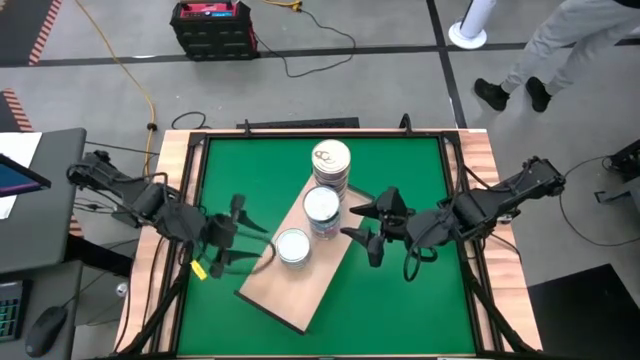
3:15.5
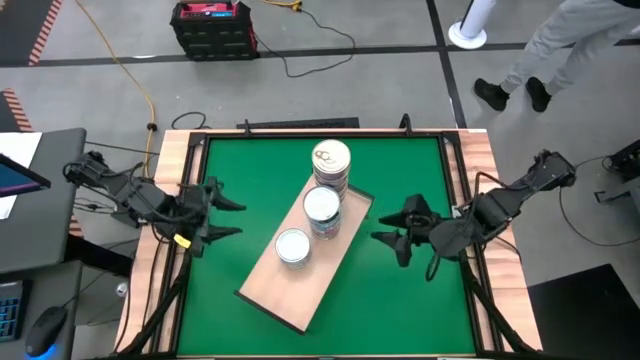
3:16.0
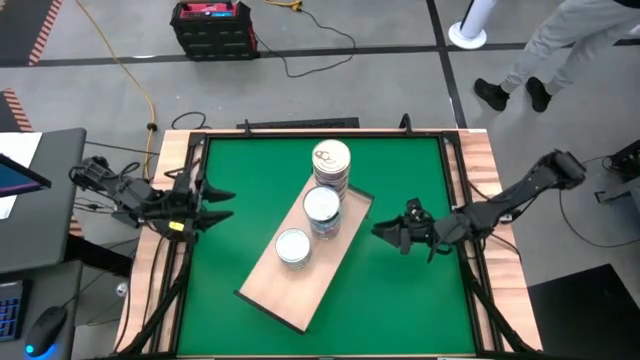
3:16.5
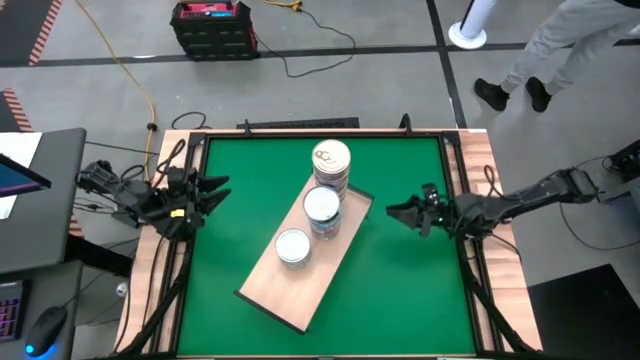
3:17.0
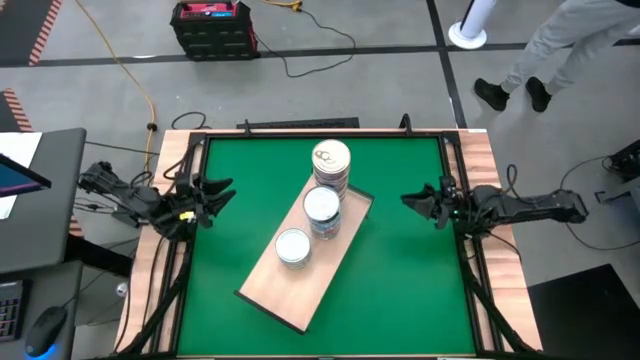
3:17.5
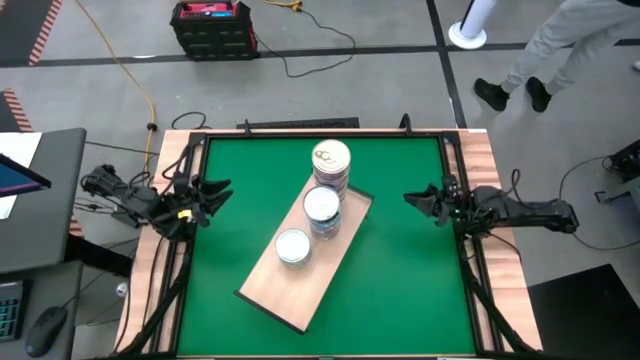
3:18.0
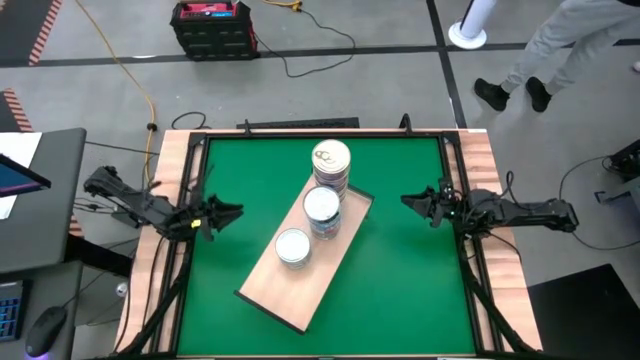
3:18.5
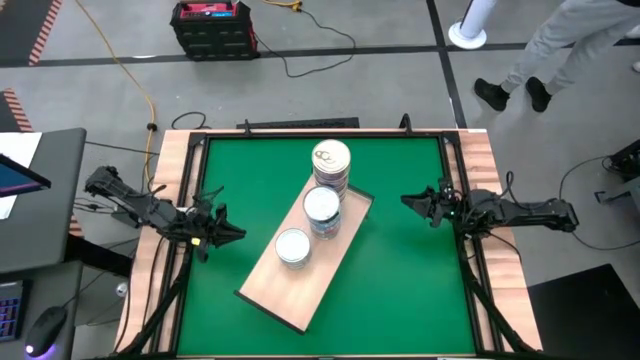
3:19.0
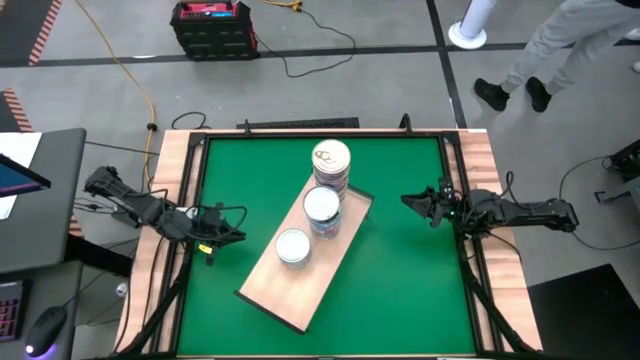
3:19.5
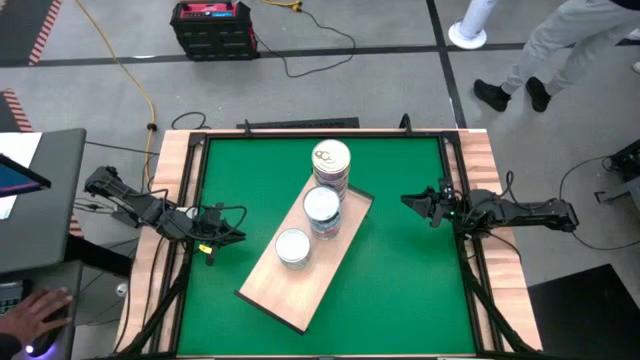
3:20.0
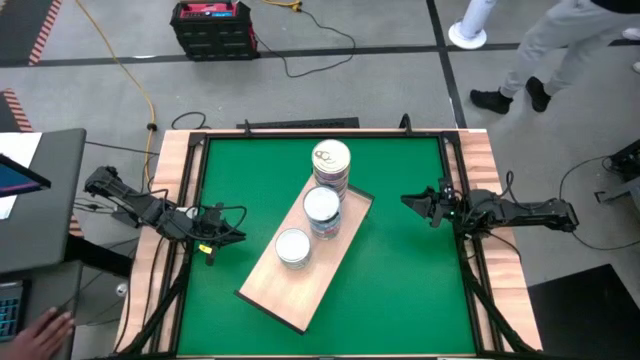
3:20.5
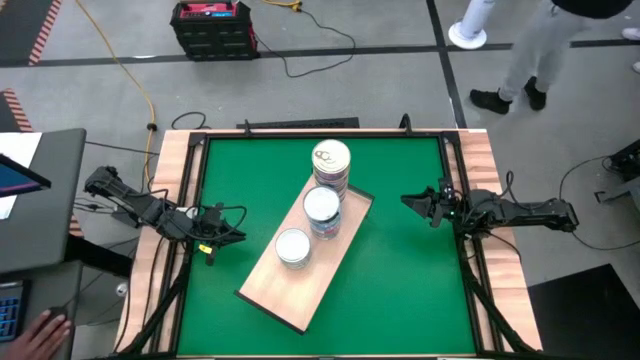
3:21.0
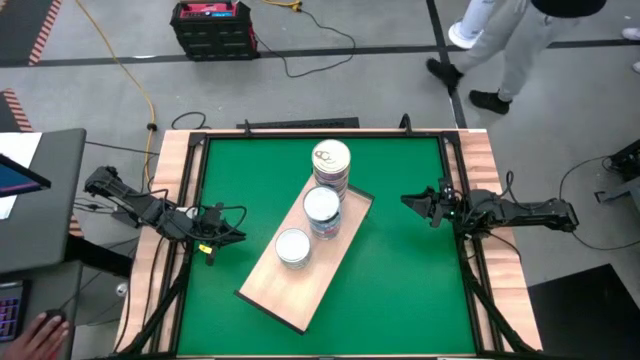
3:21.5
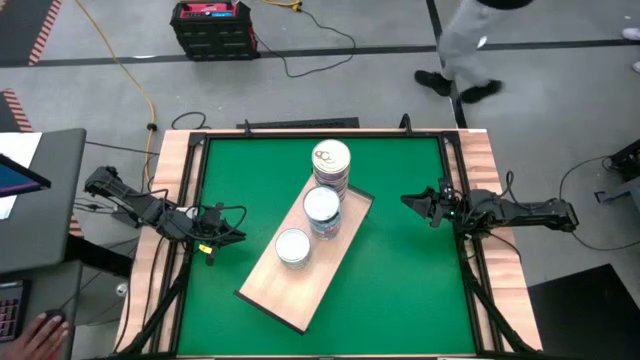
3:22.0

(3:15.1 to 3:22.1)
Task: Stack canned seafood by type on shelf
Return to Home Position

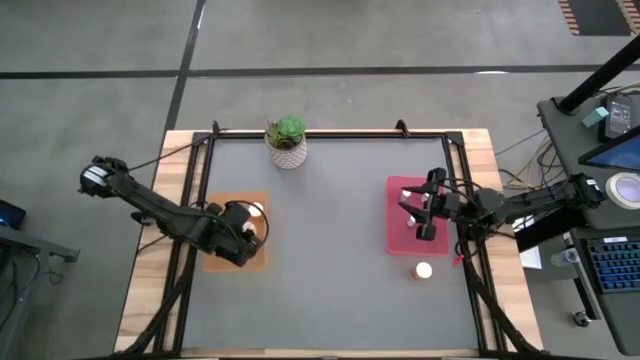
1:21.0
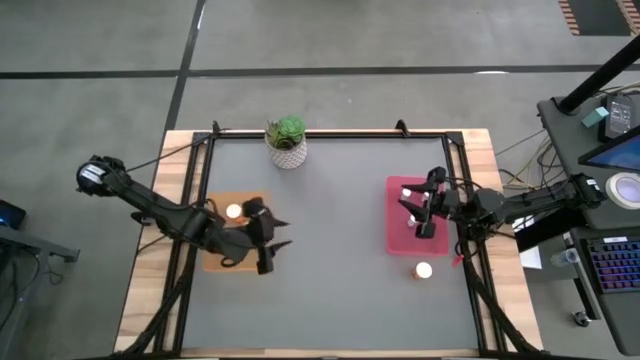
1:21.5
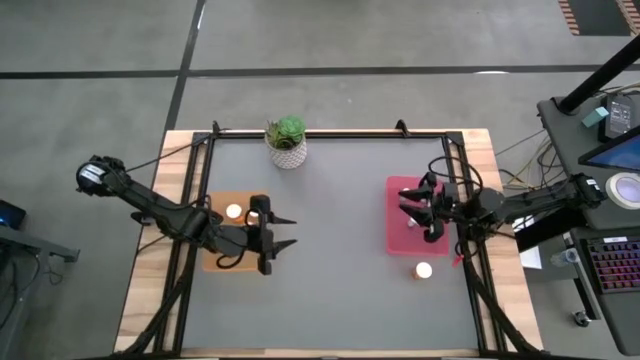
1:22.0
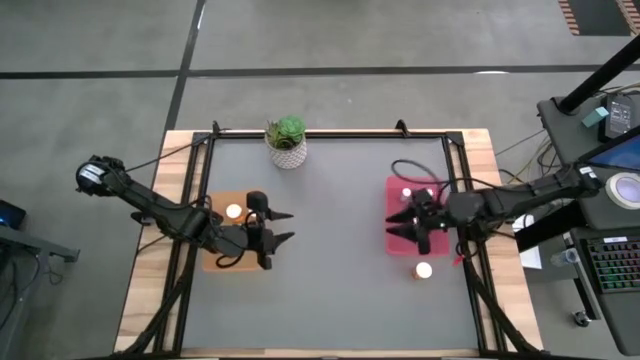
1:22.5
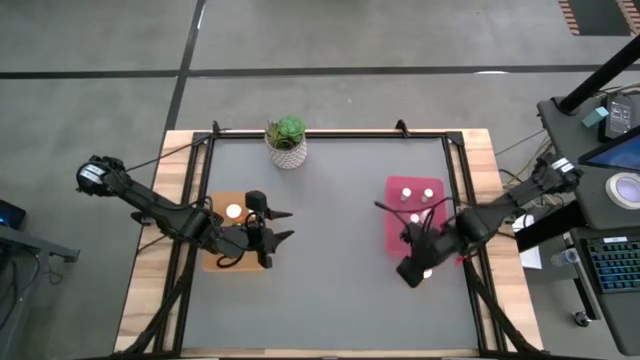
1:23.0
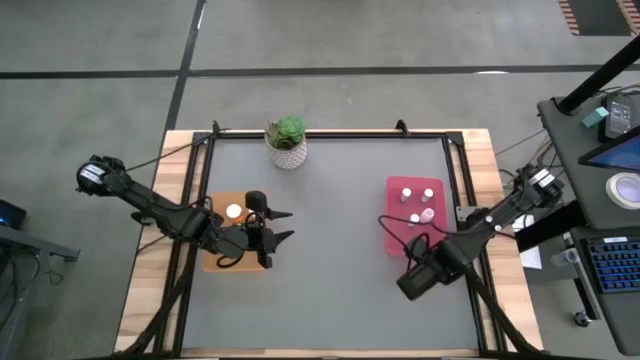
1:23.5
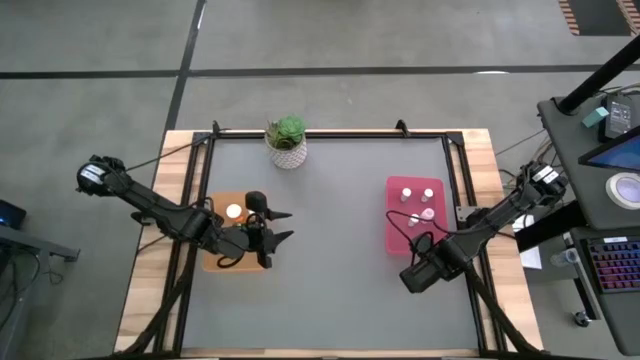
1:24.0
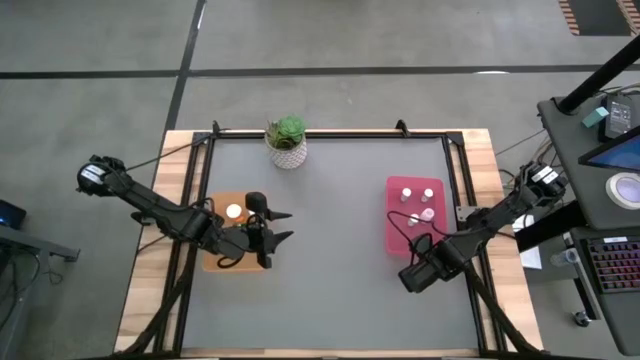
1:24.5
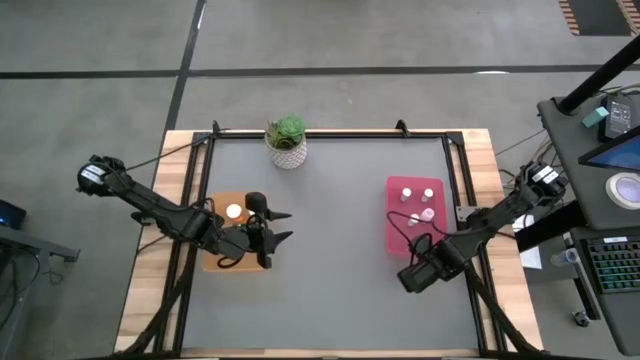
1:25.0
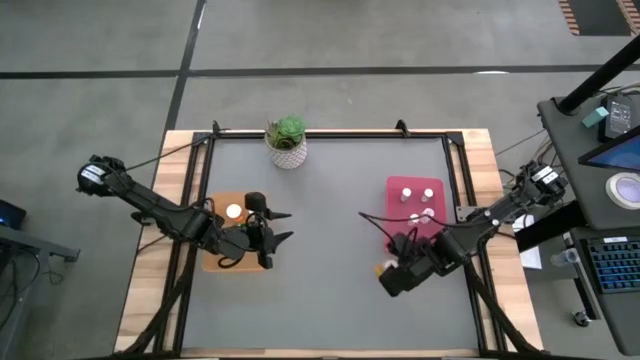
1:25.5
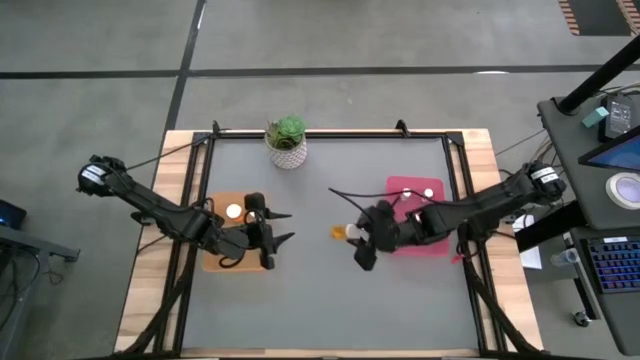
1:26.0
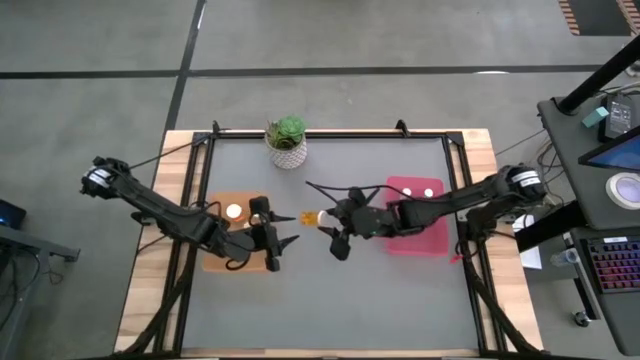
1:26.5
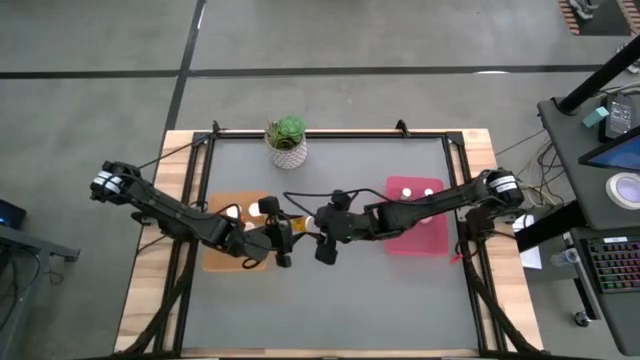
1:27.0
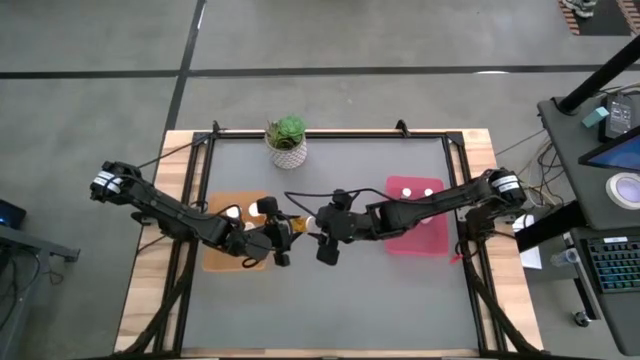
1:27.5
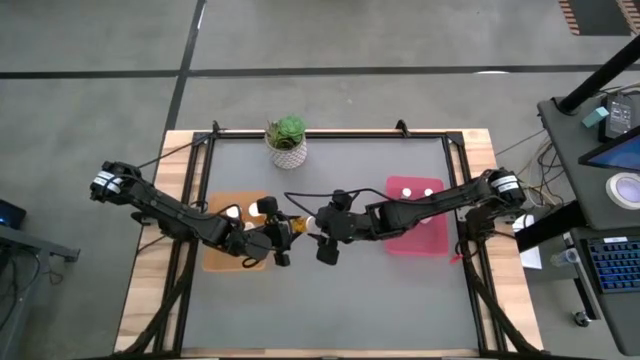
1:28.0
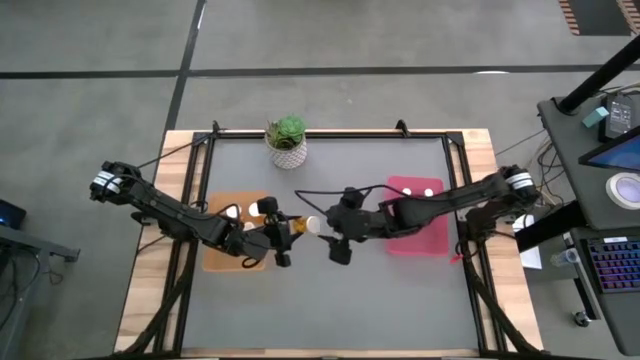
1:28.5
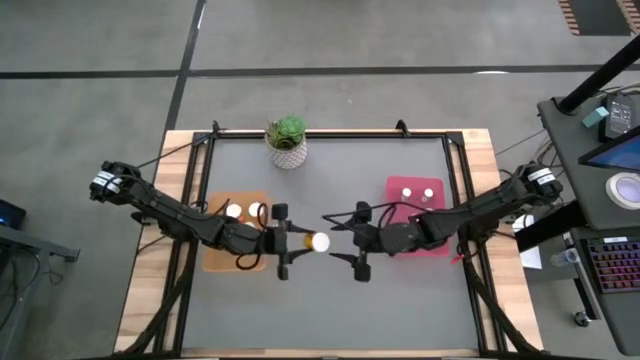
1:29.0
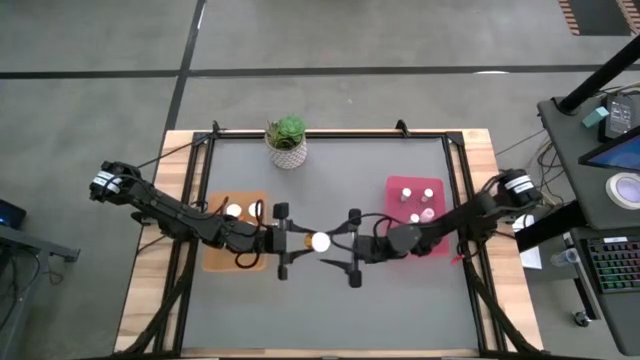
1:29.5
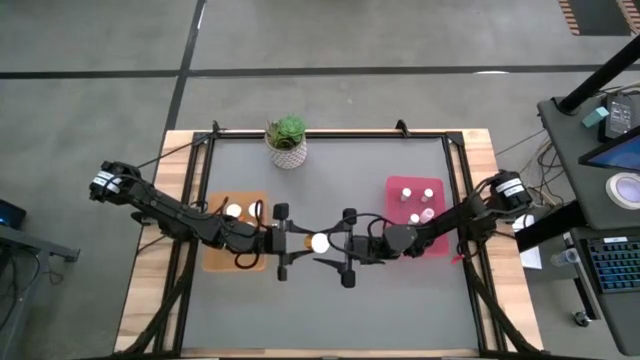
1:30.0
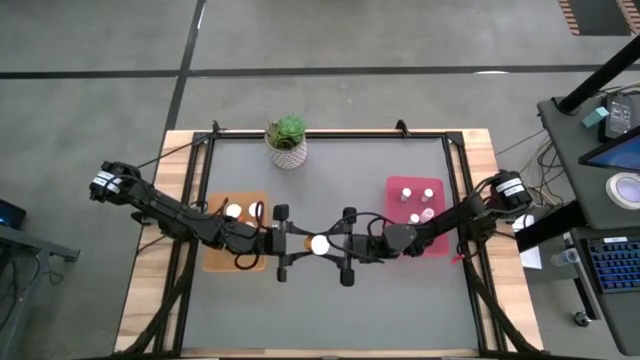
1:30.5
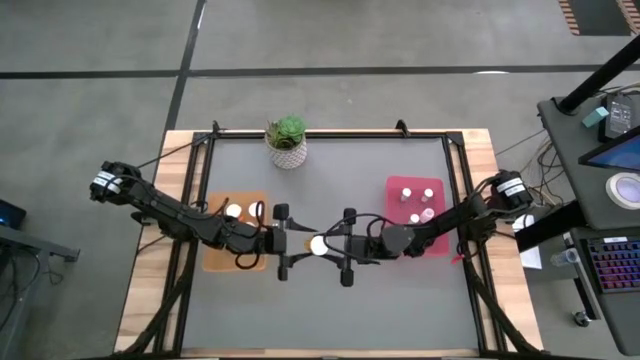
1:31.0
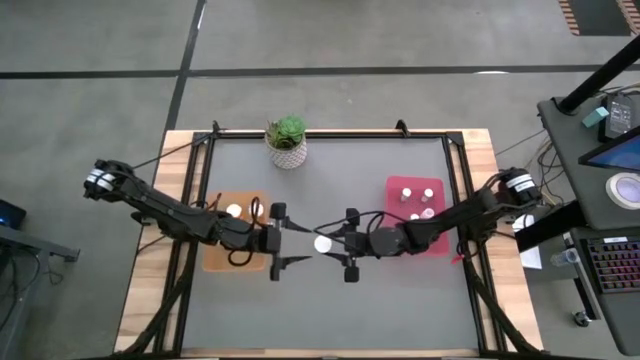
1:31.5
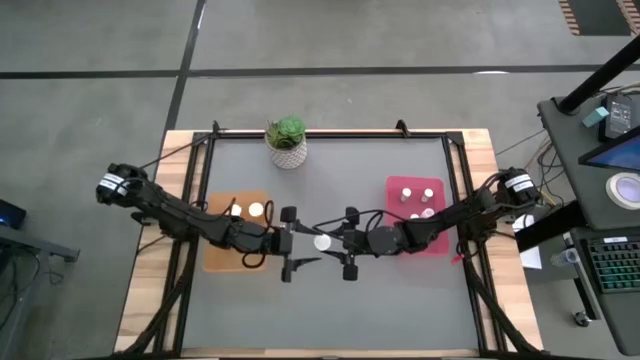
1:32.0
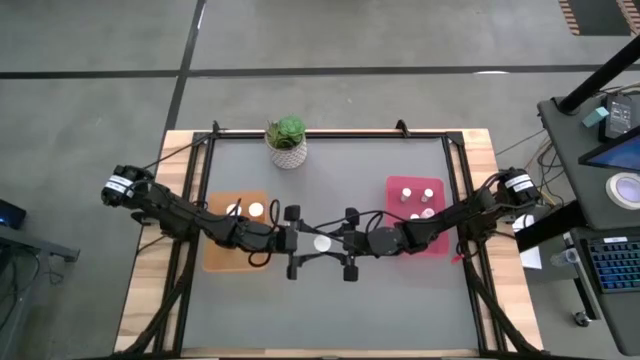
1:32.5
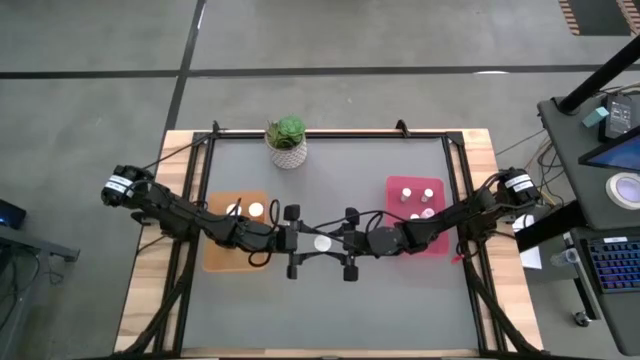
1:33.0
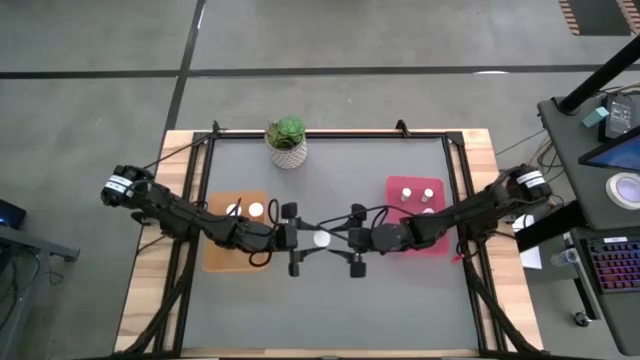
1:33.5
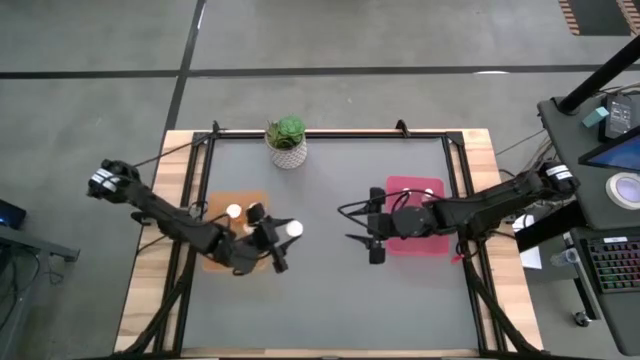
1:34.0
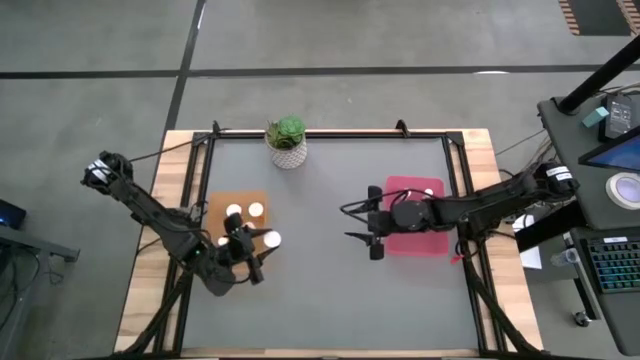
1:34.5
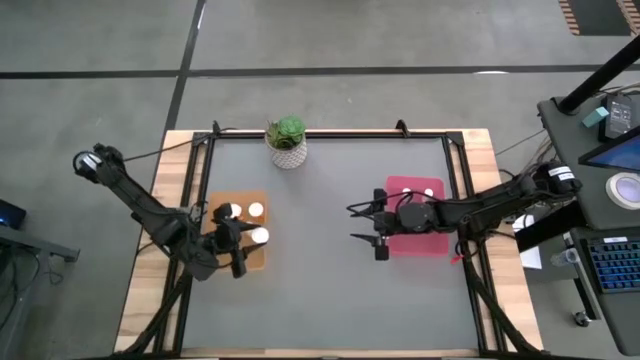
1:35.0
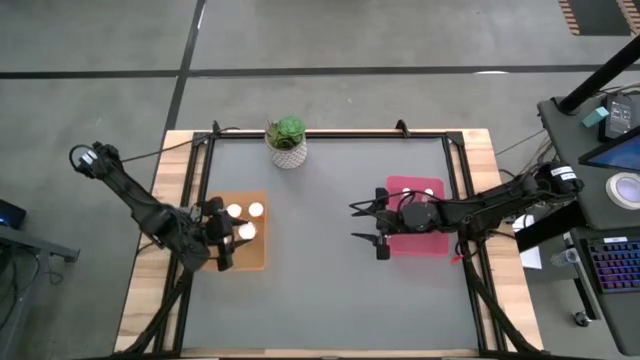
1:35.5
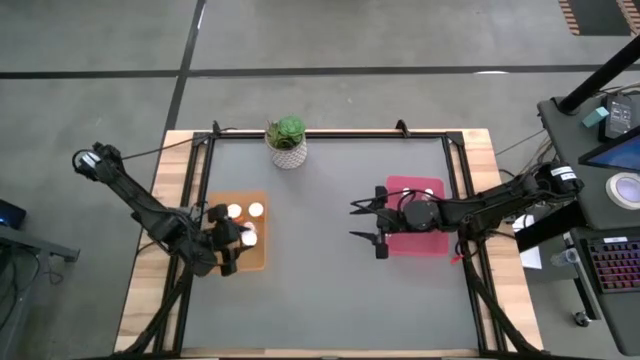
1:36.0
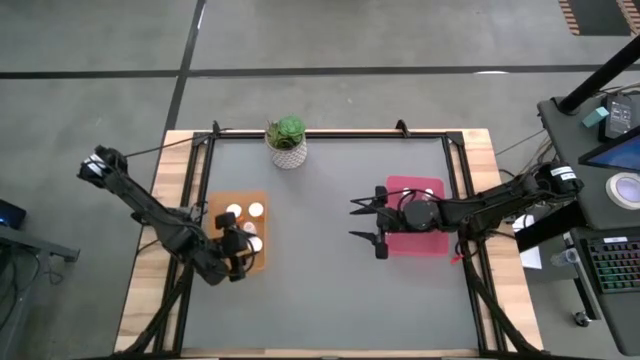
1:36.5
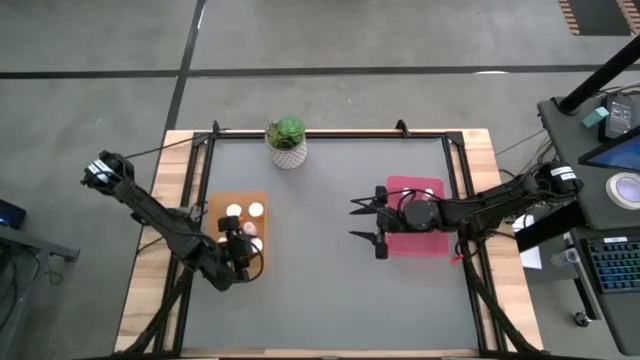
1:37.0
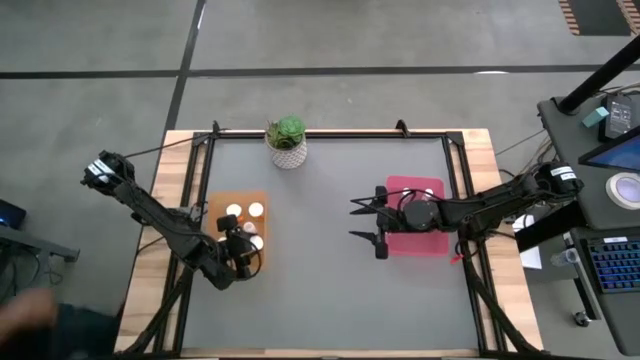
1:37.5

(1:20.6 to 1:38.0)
Task: Pick and place medicine bottles into bin by pill shape (circle, oval)
Put the orange capsule bottle into the orange bin
